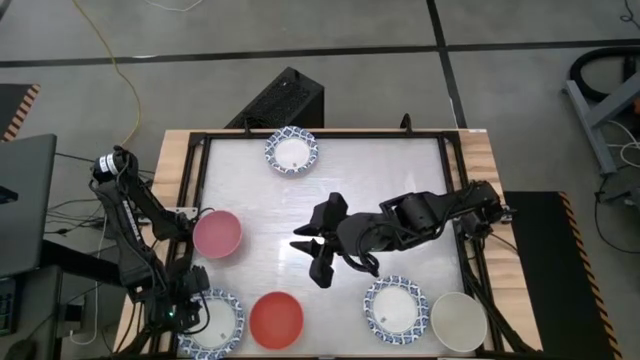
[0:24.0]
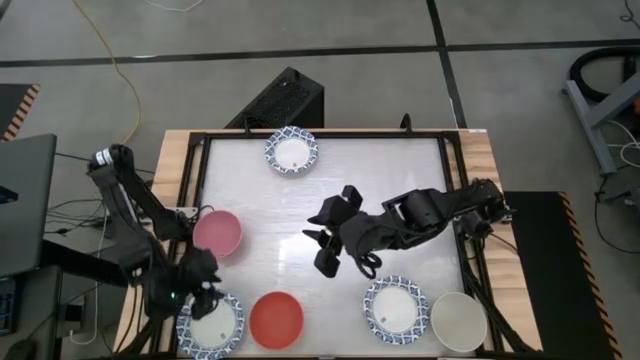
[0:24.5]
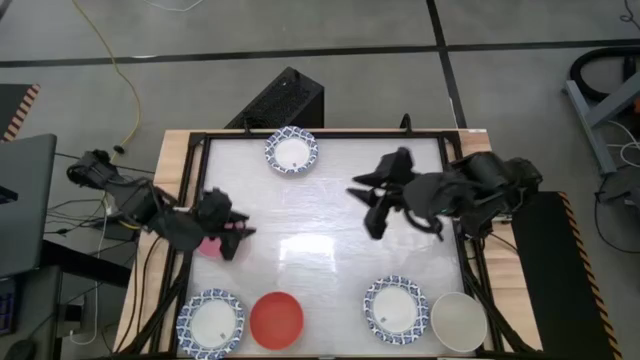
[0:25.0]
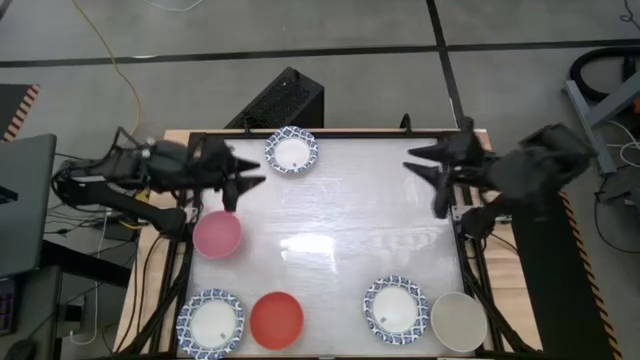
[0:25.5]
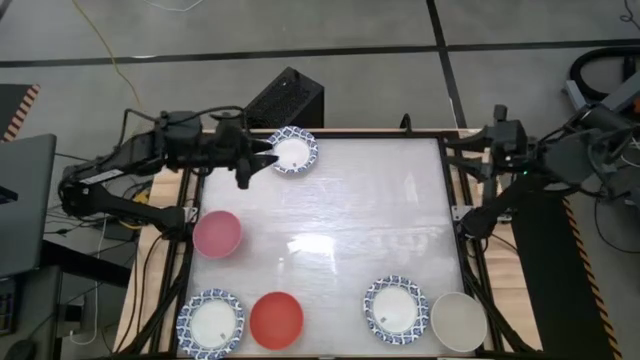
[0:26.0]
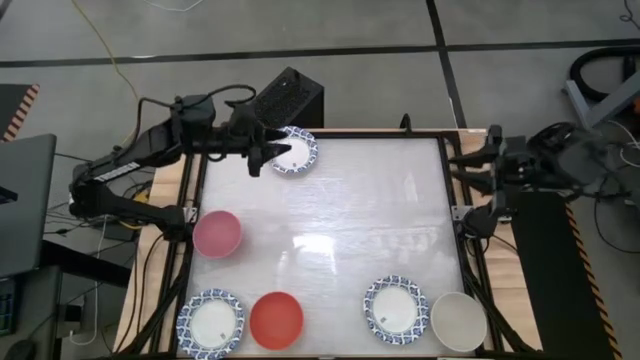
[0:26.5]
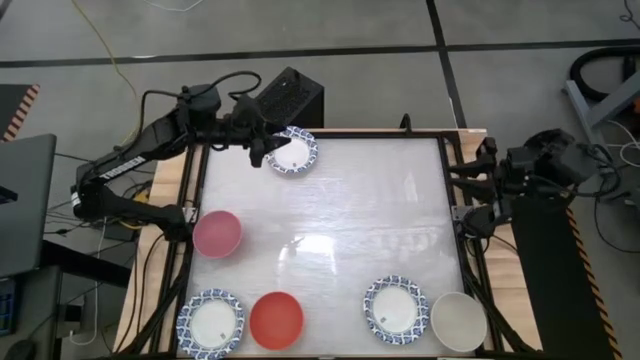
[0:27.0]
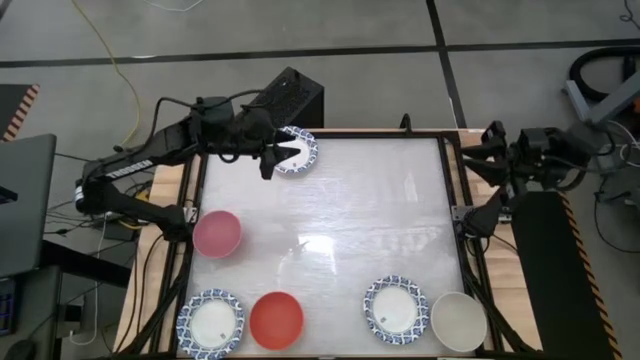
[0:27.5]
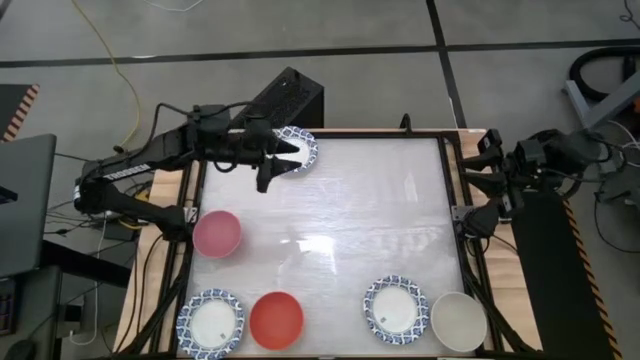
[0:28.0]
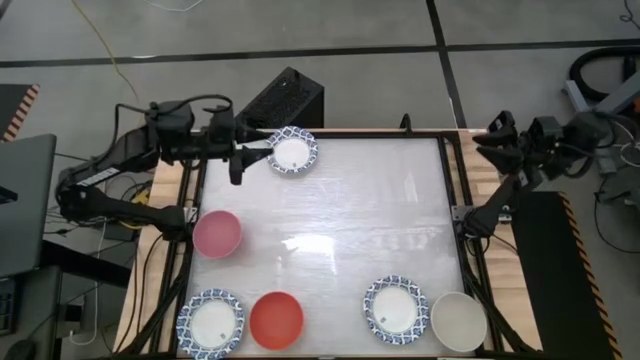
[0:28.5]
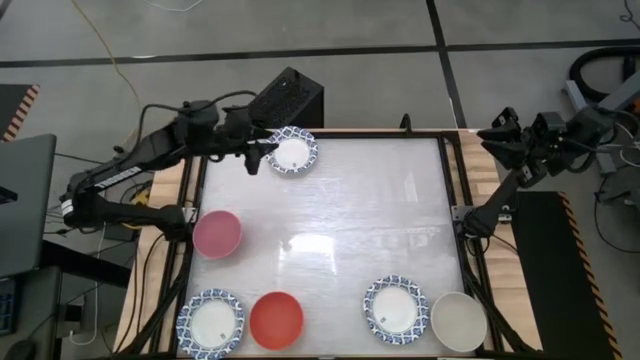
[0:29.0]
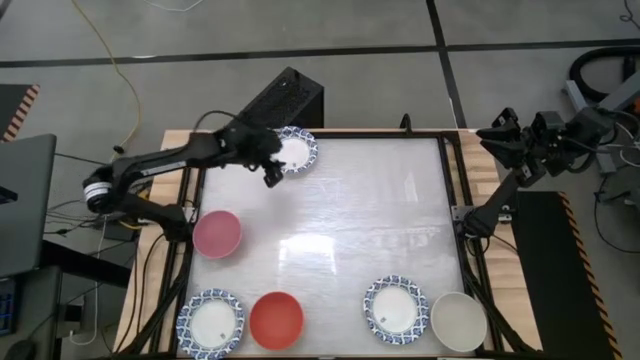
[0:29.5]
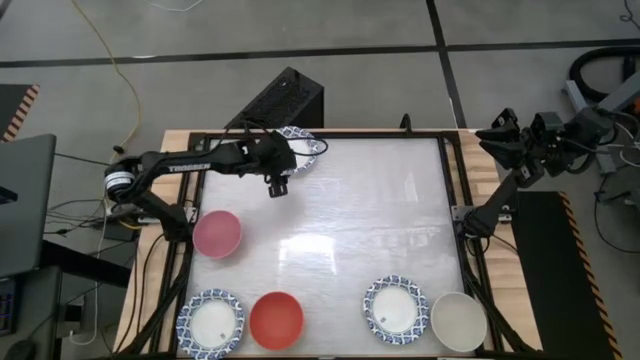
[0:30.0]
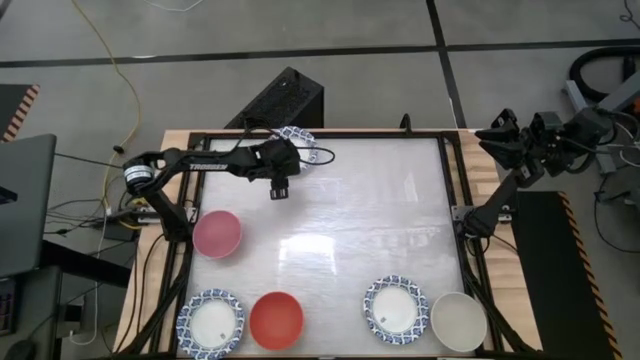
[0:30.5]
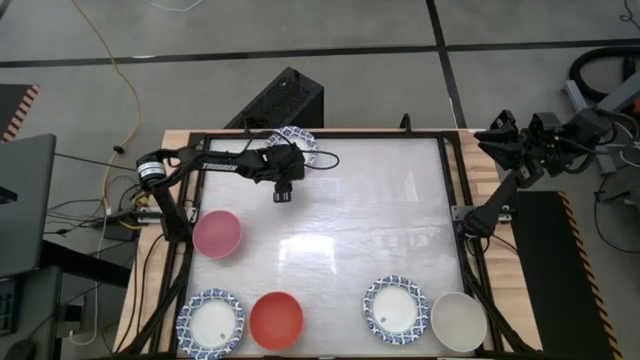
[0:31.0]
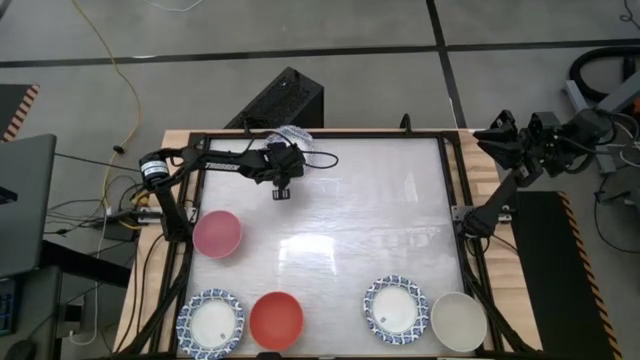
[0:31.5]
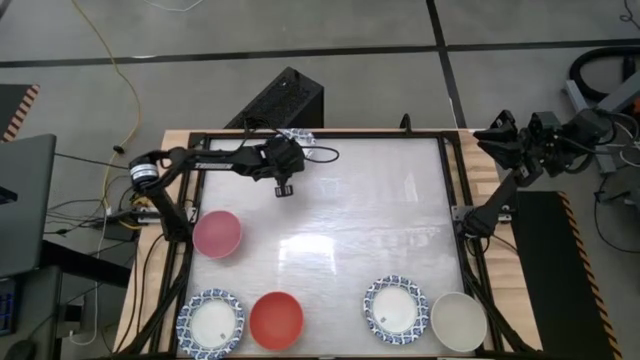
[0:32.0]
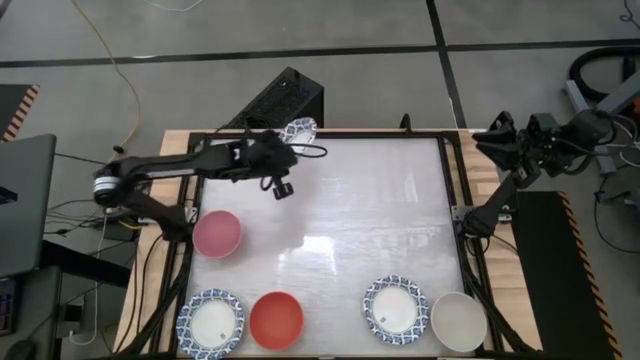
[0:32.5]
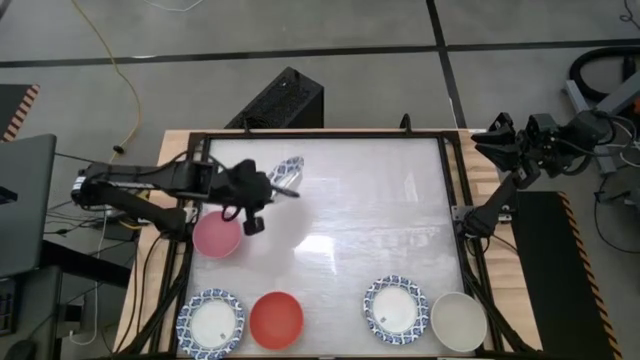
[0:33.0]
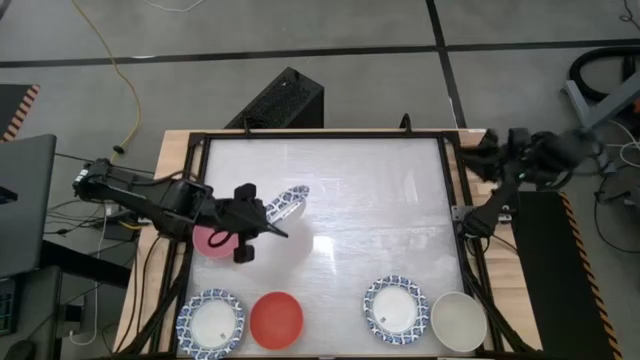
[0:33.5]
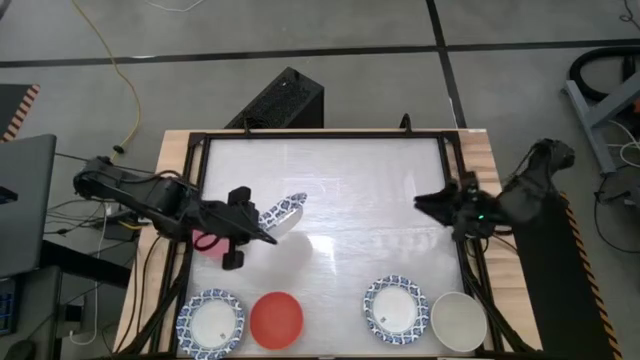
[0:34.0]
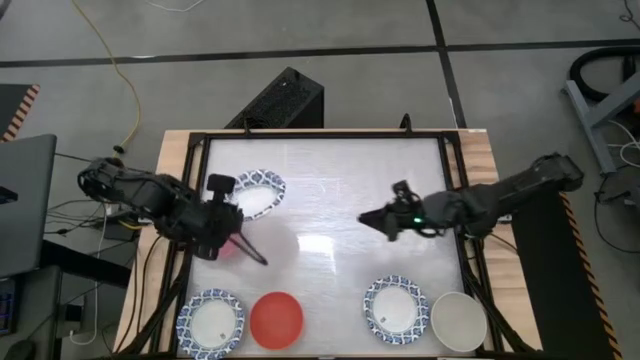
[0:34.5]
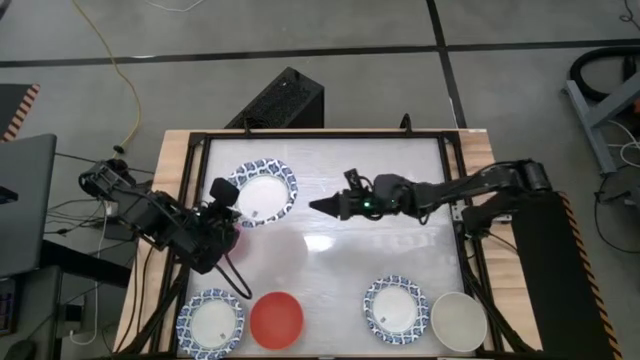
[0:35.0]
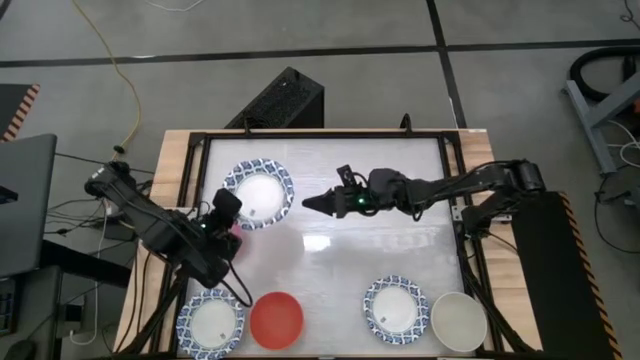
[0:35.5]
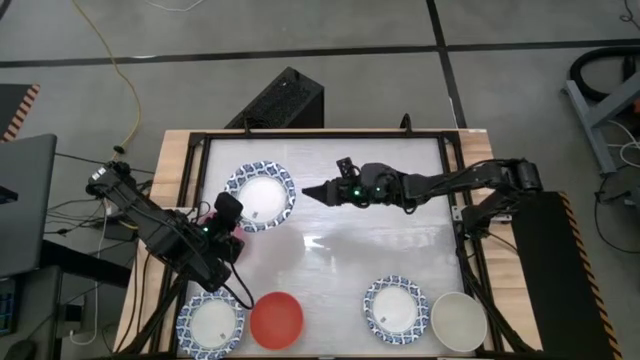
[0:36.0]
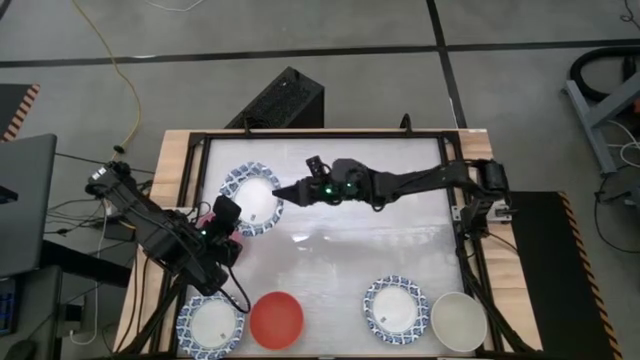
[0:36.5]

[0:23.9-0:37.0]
Task: Nest bowls inside each other by size order
Stack the white bowl onto the stacked white bowls
